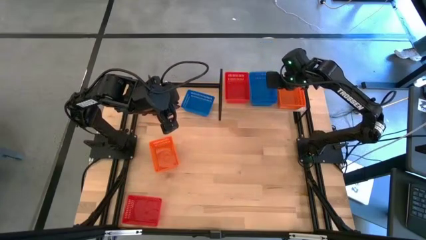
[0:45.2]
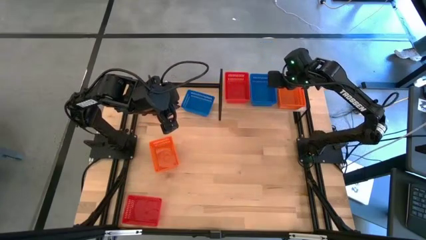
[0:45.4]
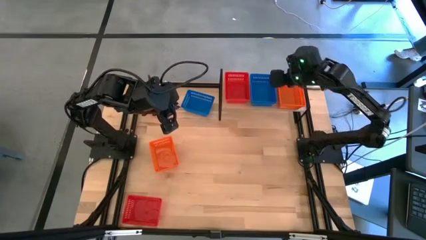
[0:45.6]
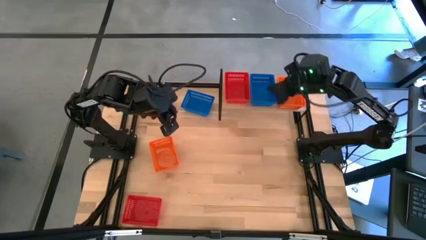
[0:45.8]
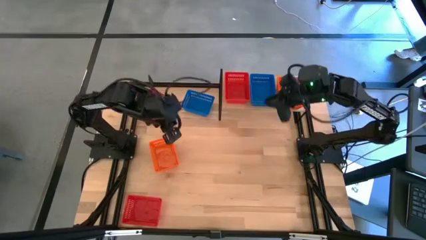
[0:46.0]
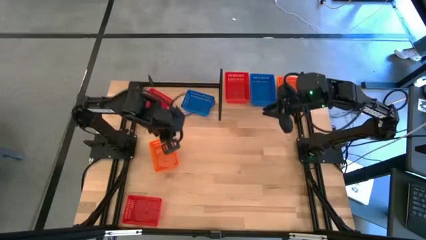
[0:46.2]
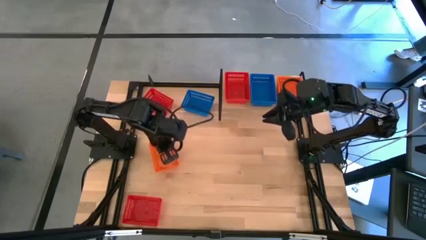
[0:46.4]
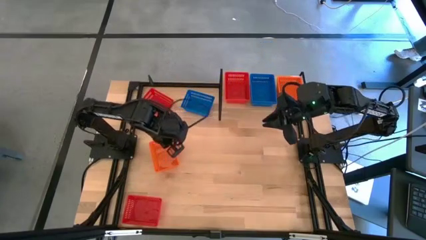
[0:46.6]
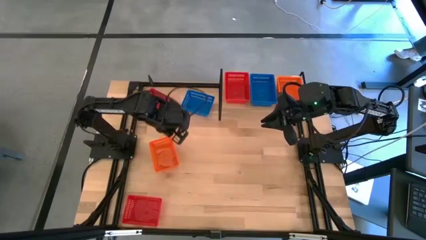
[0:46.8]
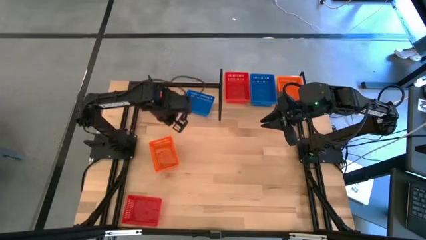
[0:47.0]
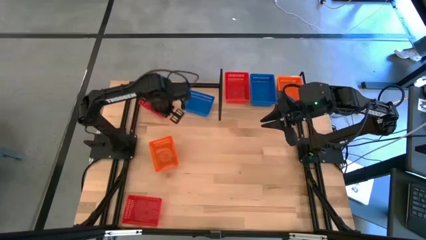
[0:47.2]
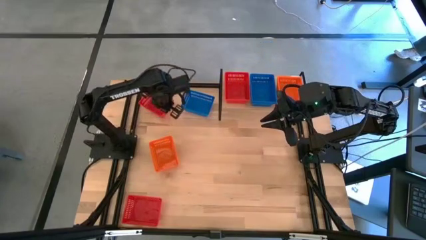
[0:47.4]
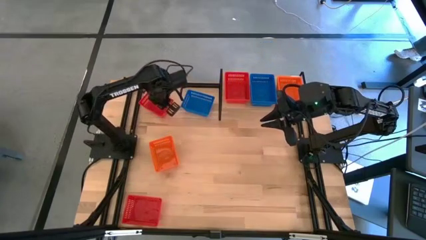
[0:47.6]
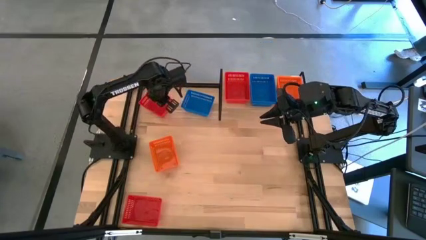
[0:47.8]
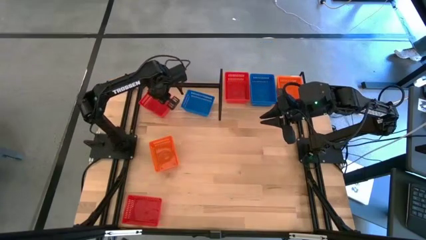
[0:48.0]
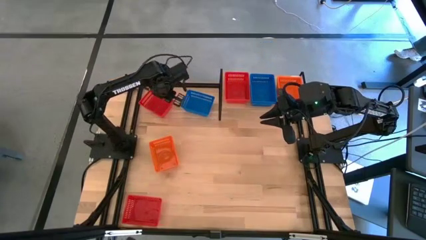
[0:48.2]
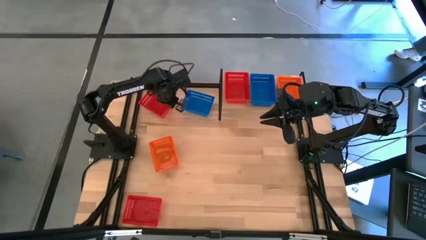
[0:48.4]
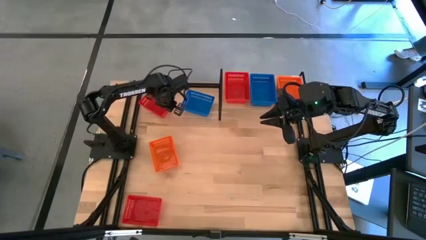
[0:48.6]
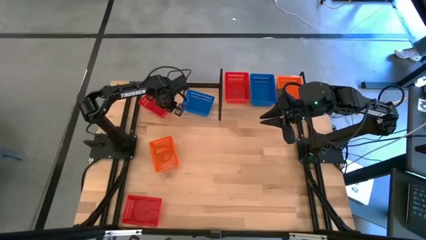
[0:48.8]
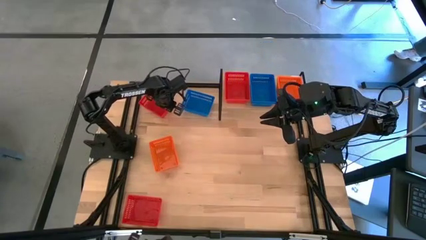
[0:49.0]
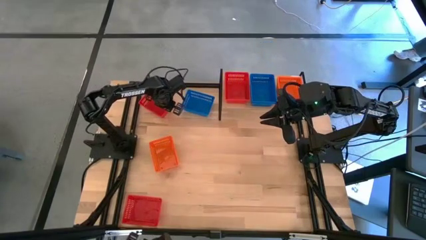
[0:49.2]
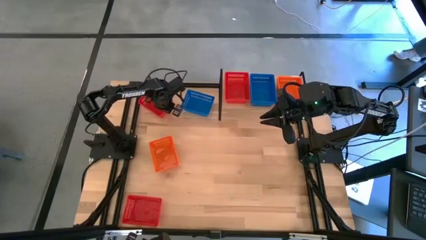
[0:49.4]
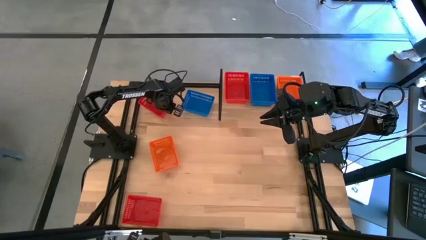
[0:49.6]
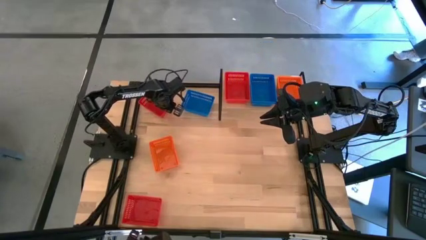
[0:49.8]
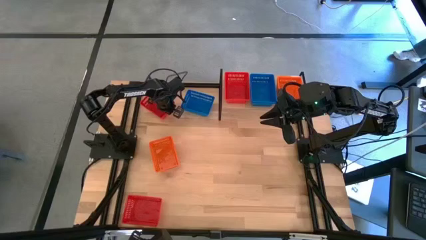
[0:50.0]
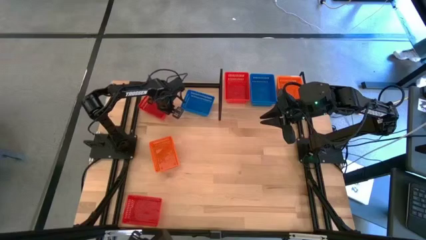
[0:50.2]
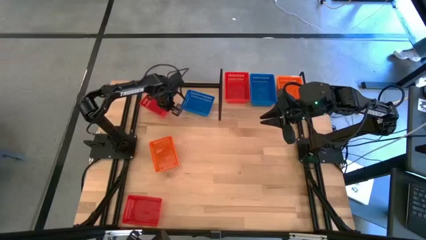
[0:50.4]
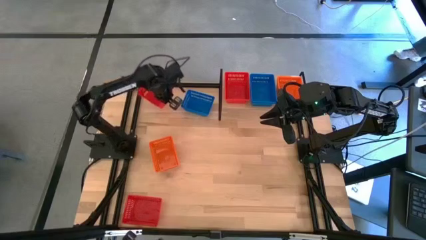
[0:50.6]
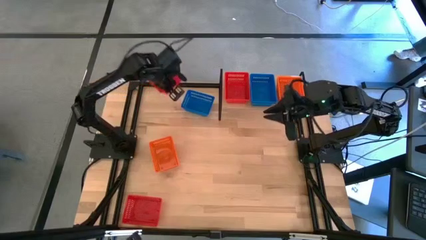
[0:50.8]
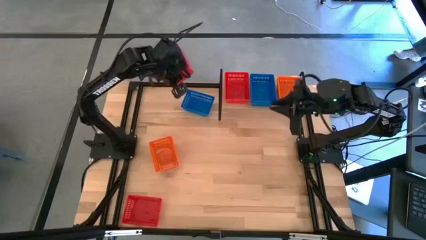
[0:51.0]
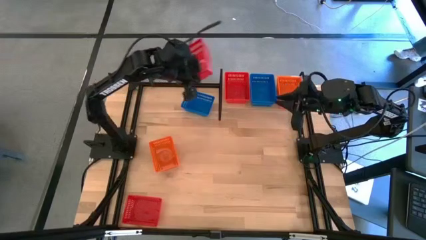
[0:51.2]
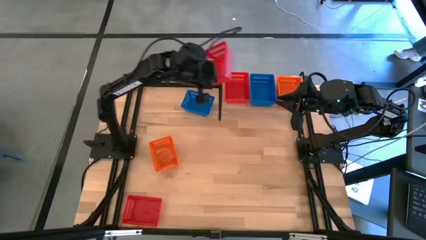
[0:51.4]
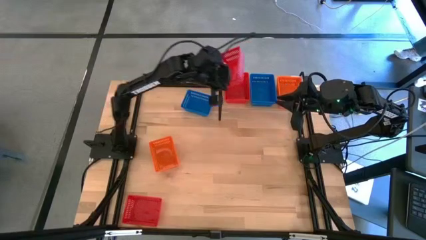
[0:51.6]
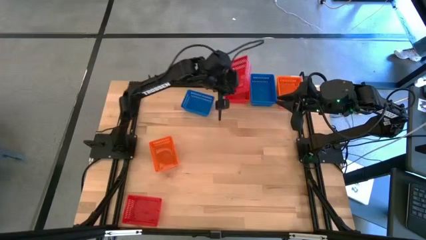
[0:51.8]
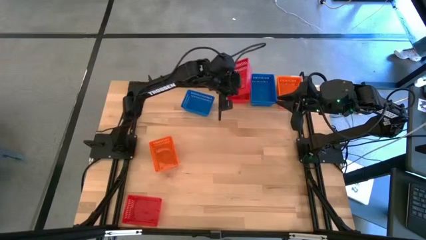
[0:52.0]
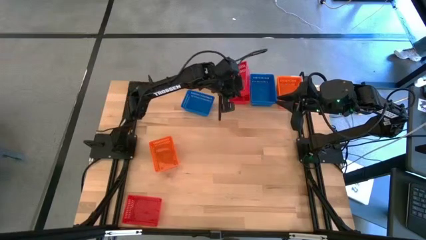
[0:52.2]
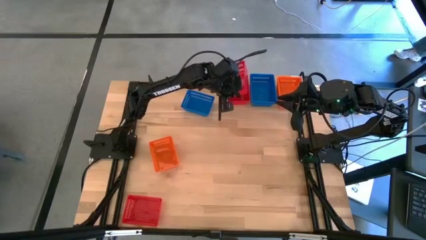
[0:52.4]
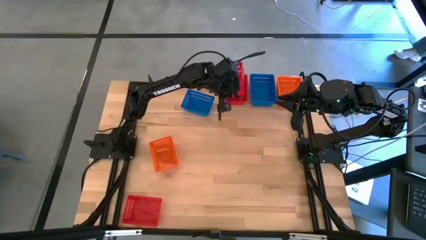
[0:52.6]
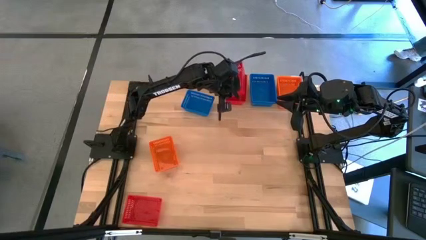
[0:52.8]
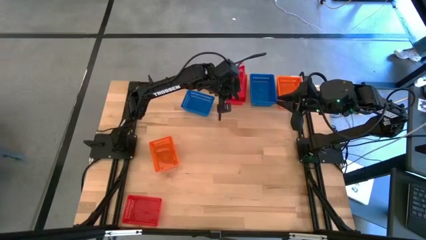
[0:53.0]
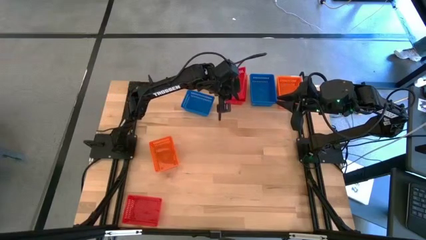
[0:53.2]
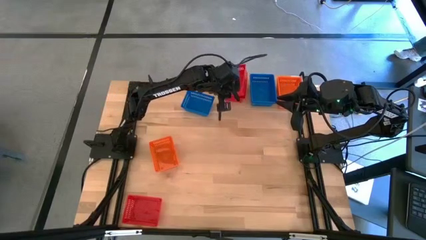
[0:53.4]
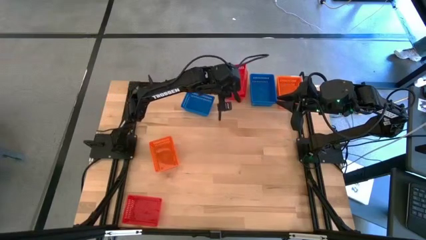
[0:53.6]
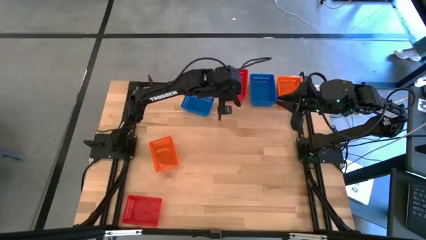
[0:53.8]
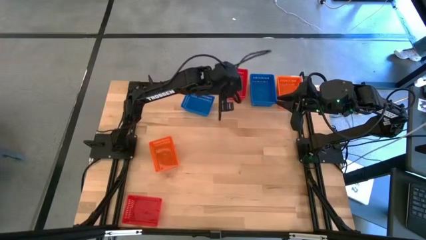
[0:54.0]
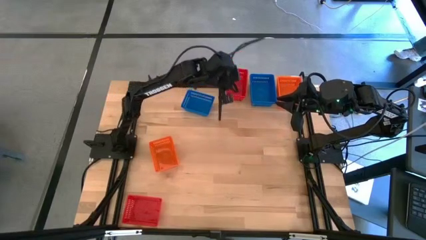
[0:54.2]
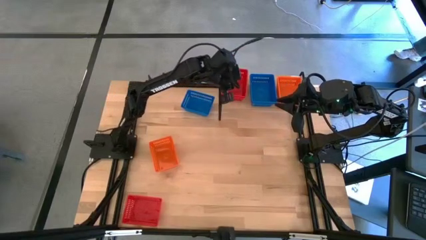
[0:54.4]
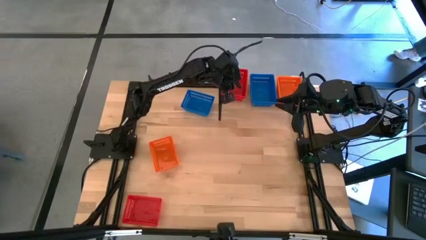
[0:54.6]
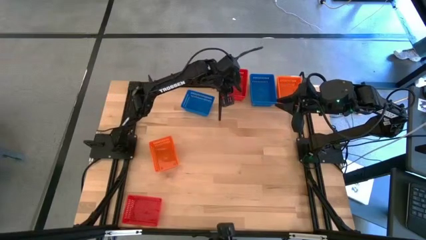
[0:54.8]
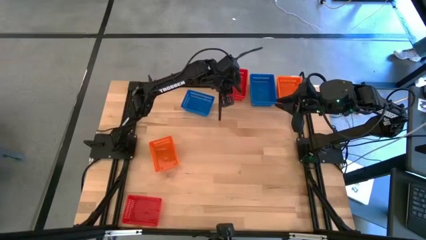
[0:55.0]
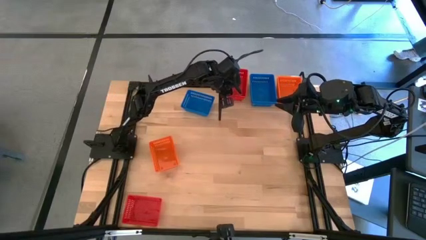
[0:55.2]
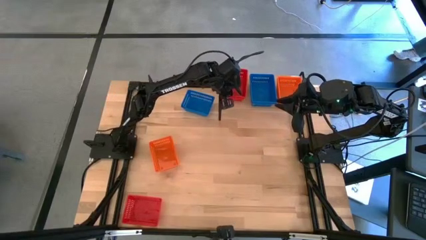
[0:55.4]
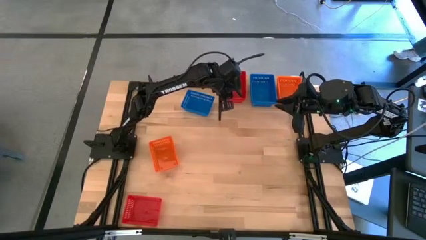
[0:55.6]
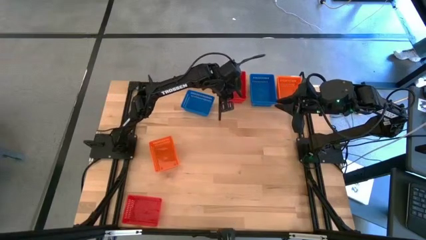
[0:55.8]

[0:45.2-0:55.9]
Task: Stack baskets on shelf by color
Stack the top red bin on top of the red bin on the shelf

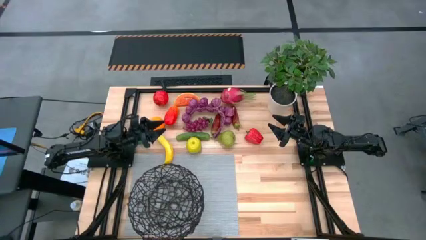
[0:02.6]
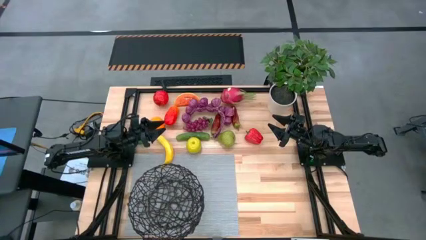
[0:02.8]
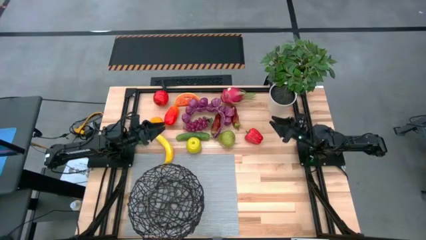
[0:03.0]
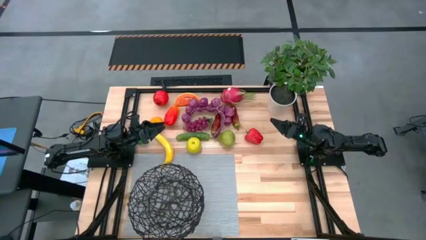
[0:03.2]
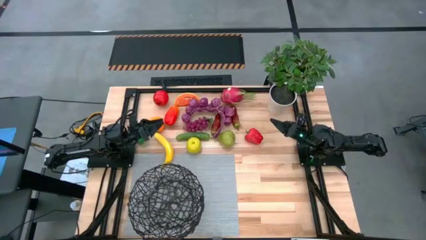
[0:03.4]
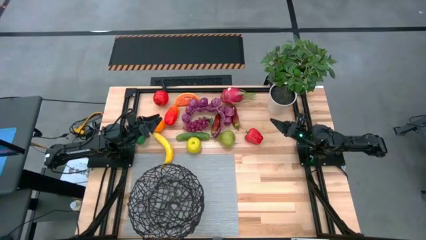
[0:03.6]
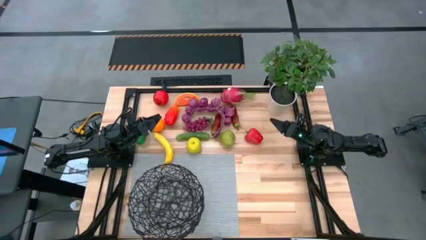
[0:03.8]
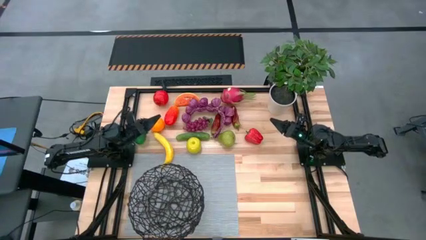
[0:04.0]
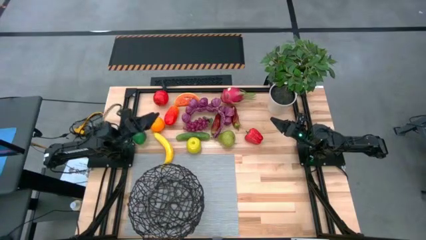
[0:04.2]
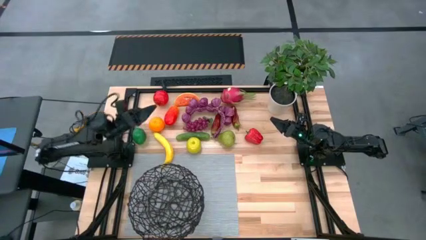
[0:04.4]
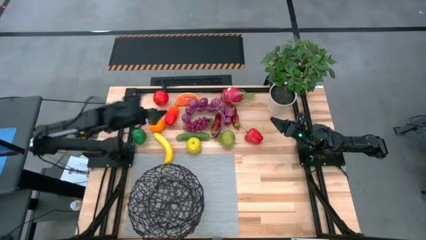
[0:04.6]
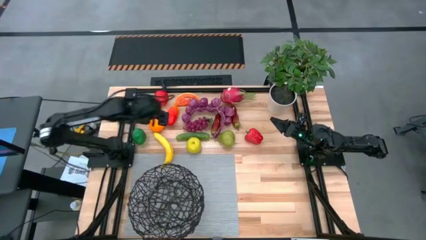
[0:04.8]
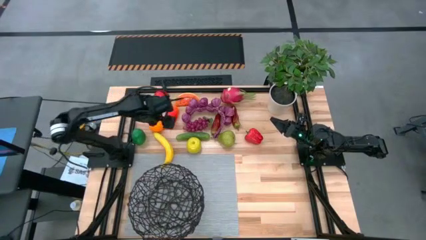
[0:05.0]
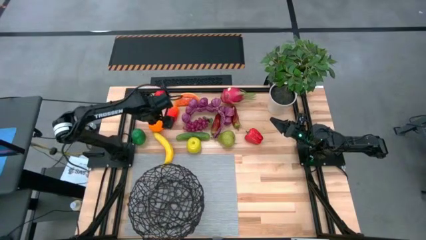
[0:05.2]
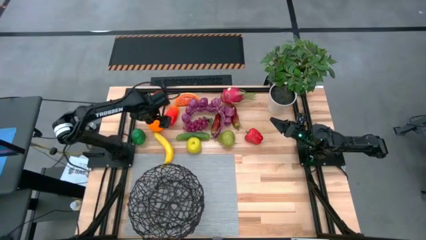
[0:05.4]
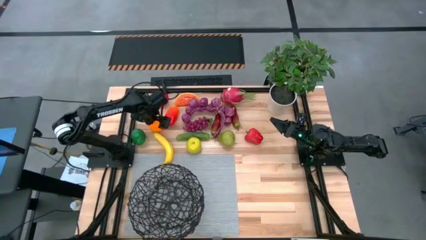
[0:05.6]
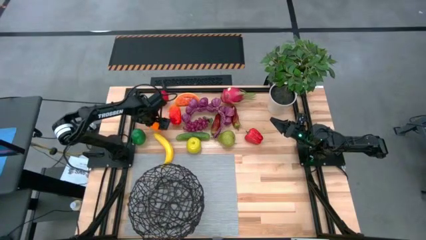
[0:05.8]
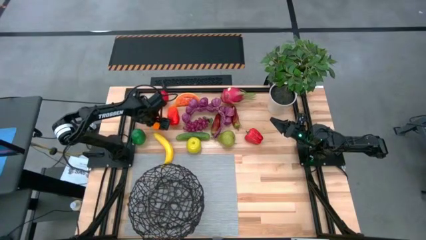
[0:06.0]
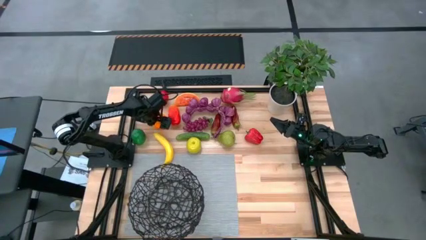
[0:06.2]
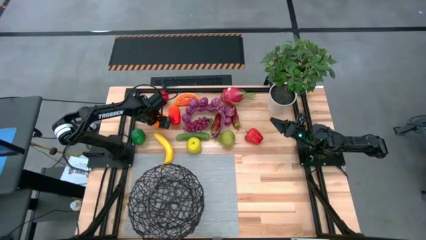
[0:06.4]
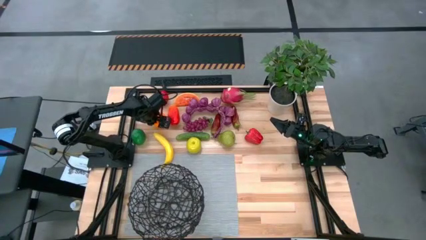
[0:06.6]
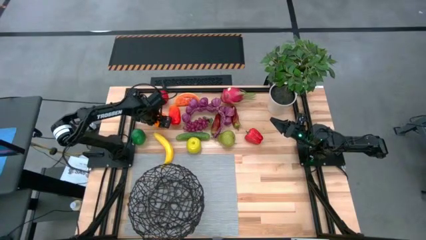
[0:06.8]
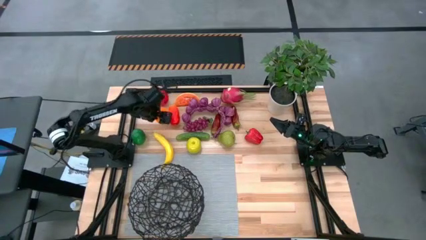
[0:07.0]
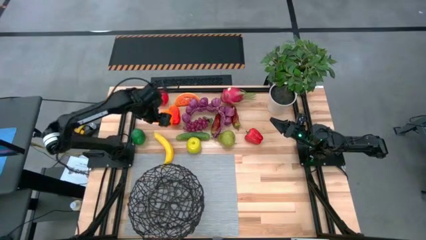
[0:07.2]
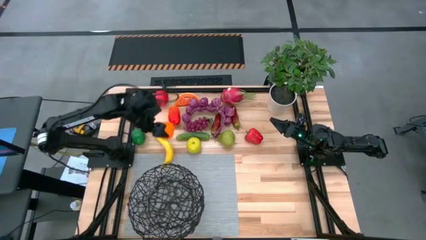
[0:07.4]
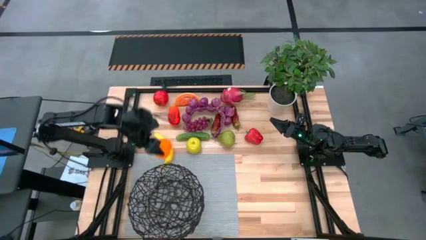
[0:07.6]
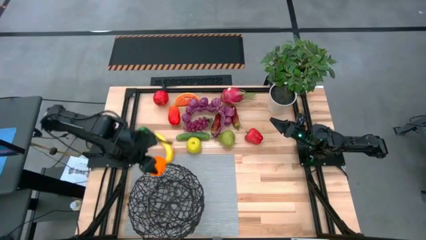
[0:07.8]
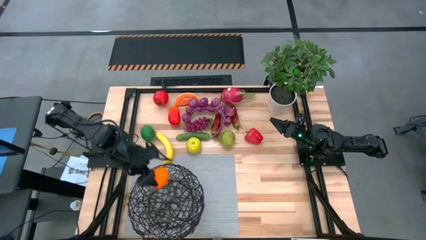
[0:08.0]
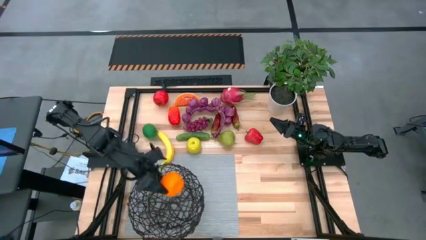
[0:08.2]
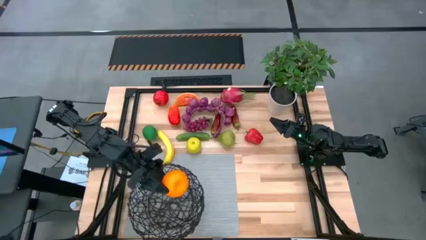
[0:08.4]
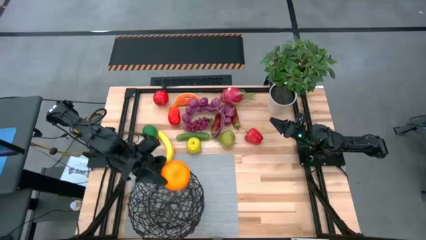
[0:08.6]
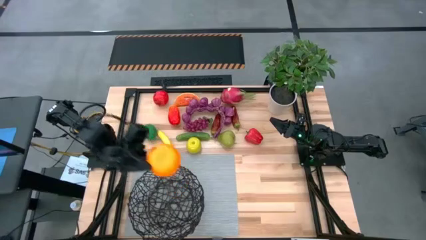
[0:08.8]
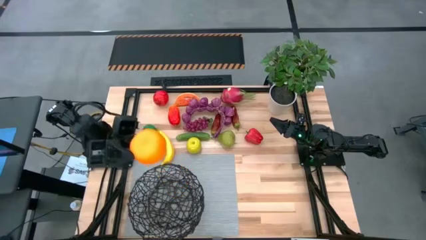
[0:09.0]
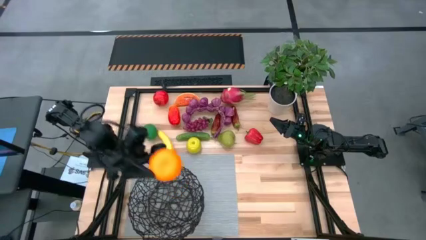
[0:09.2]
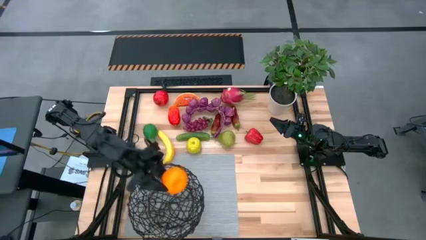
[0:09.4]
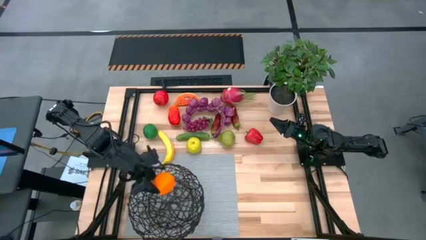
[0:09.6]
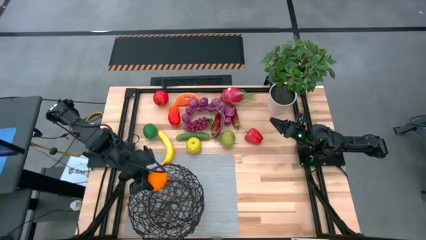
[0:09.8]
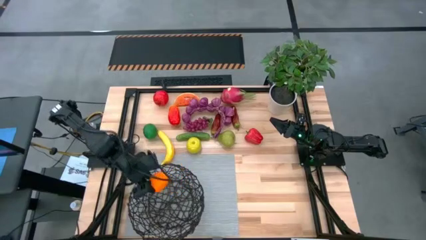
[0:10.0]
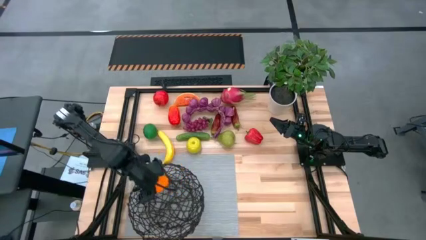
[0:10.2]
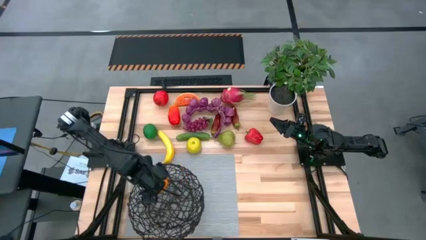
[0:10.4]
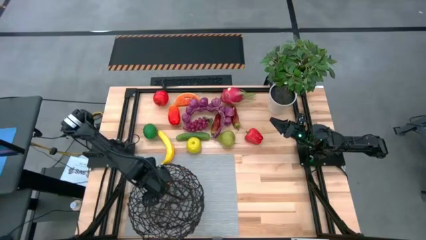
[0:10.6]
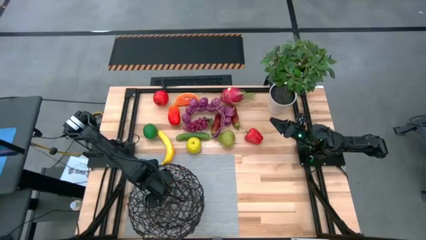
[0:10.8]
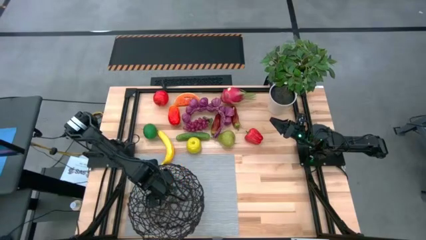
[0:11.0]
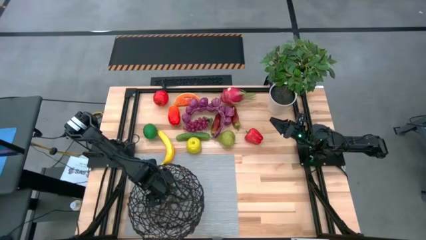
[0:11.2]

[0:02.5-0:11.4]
Task: Build produce basket
Put the orange into the black wire basket
